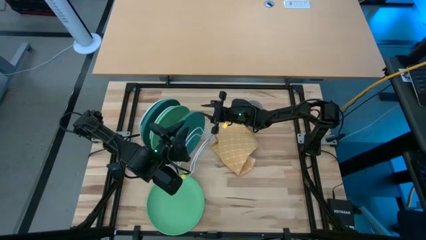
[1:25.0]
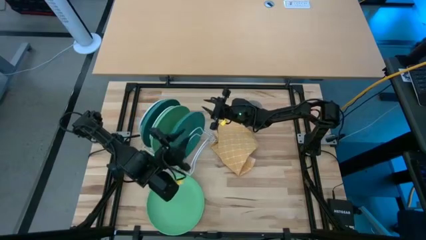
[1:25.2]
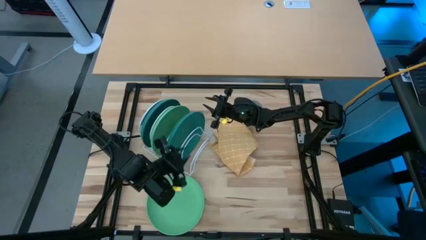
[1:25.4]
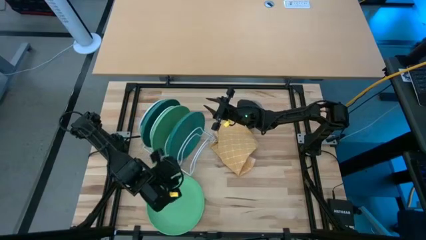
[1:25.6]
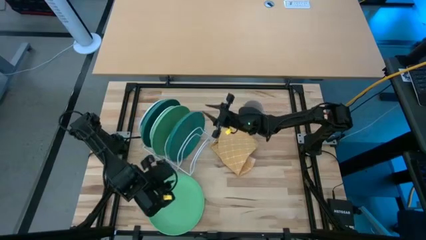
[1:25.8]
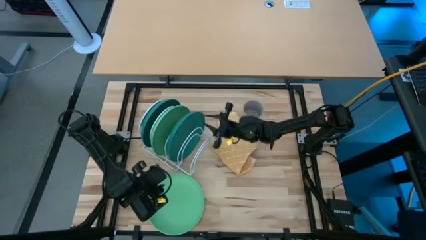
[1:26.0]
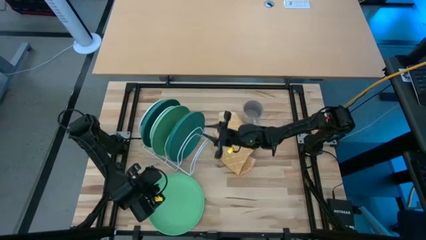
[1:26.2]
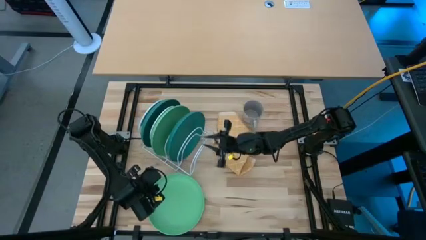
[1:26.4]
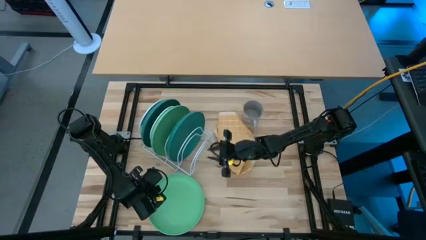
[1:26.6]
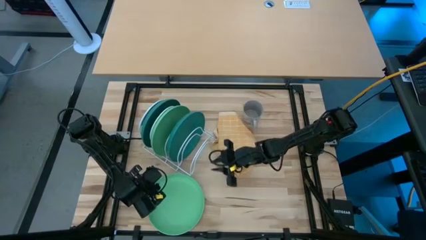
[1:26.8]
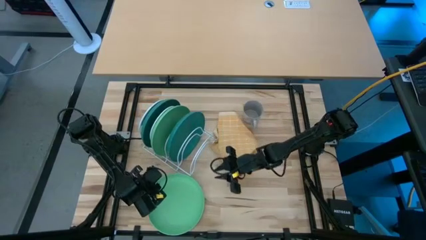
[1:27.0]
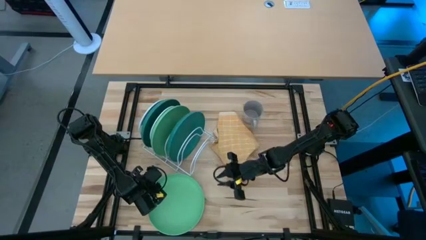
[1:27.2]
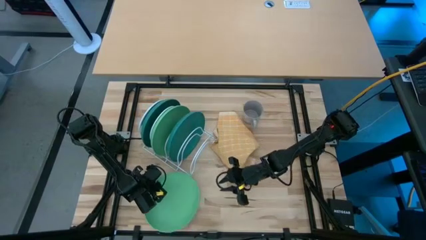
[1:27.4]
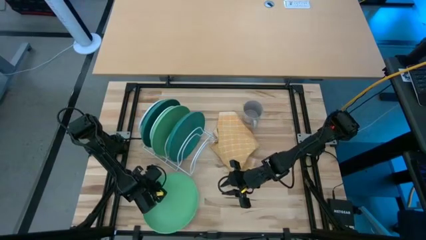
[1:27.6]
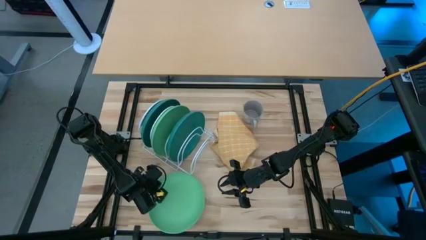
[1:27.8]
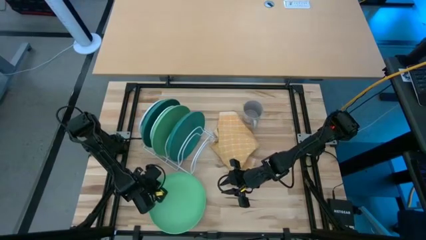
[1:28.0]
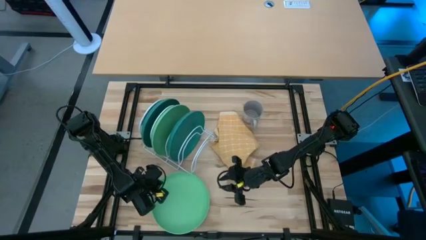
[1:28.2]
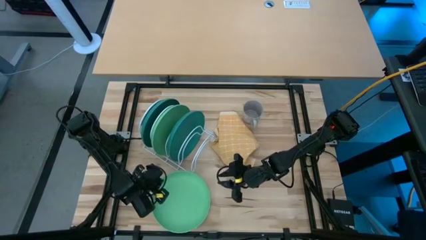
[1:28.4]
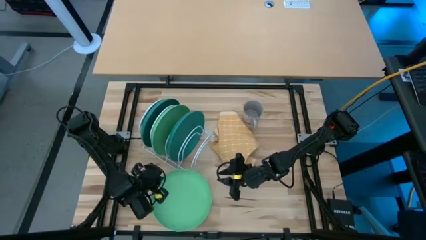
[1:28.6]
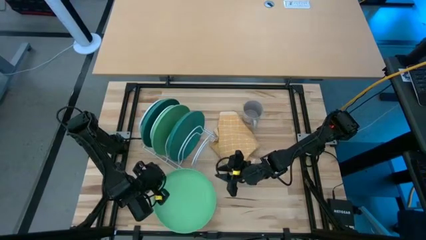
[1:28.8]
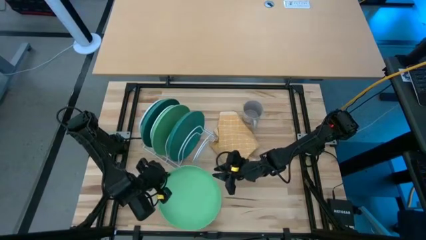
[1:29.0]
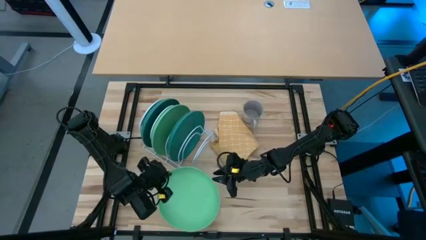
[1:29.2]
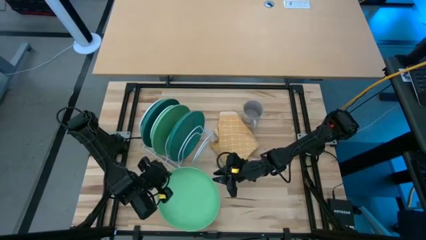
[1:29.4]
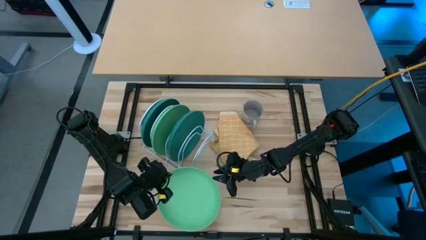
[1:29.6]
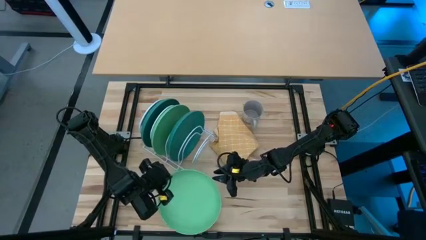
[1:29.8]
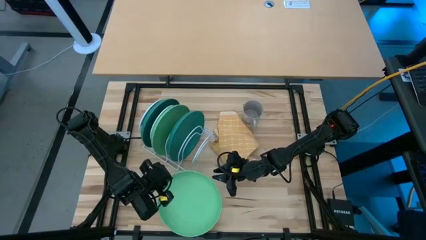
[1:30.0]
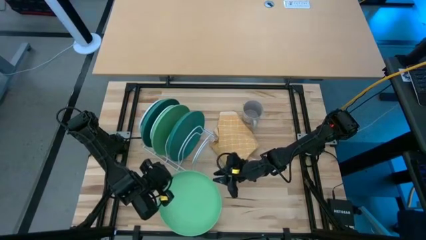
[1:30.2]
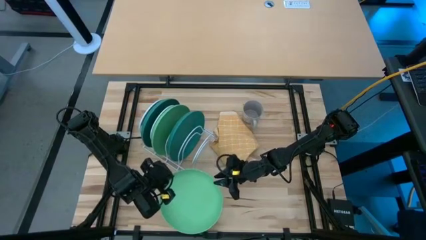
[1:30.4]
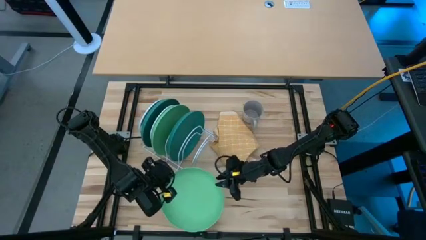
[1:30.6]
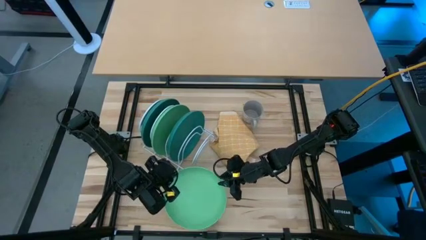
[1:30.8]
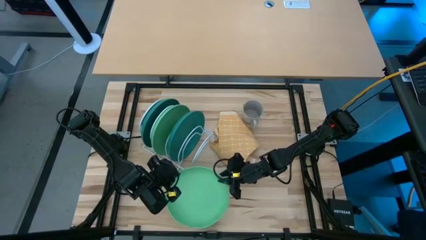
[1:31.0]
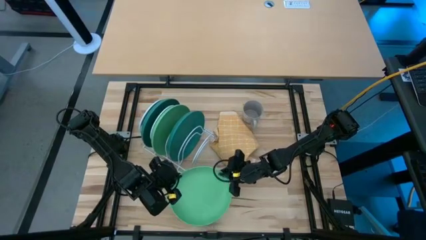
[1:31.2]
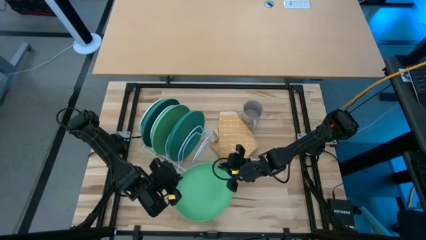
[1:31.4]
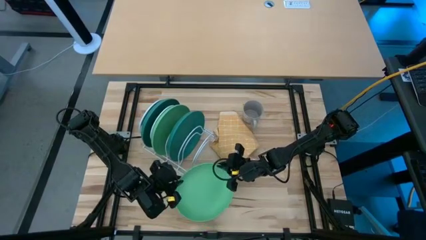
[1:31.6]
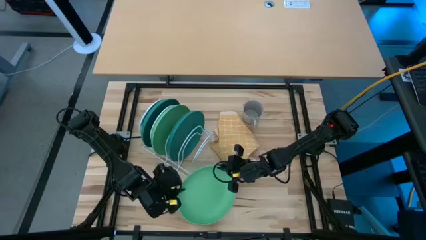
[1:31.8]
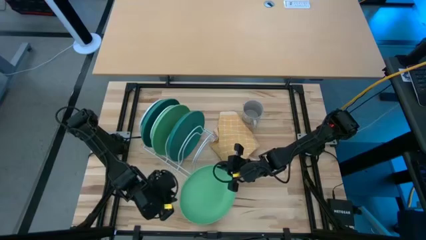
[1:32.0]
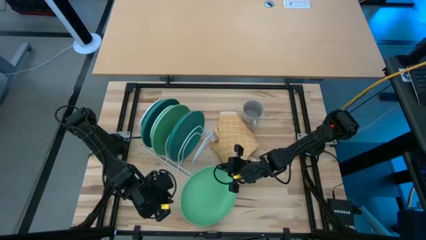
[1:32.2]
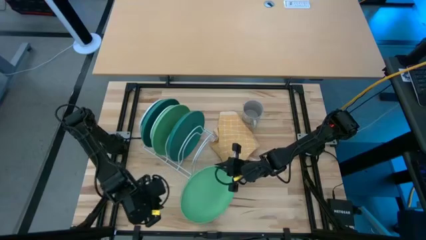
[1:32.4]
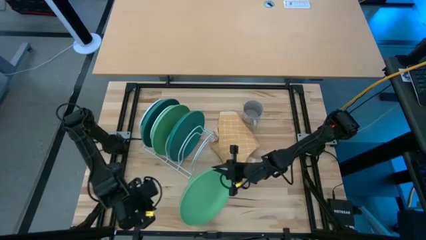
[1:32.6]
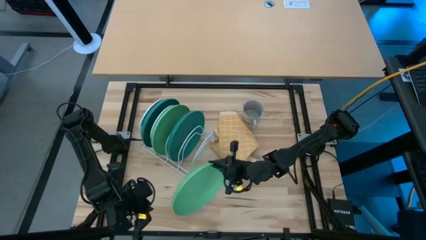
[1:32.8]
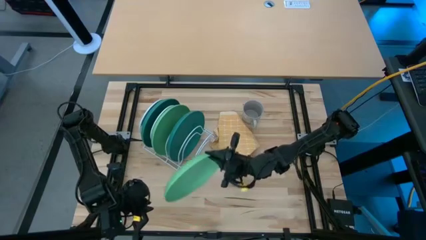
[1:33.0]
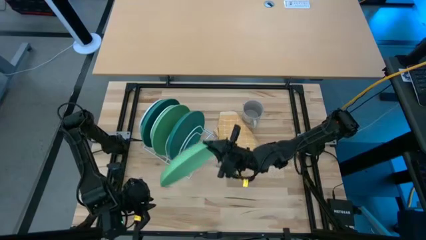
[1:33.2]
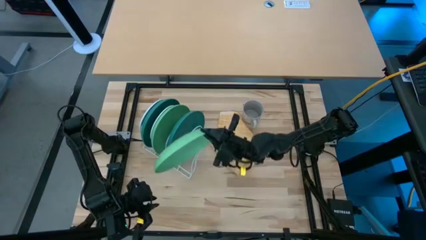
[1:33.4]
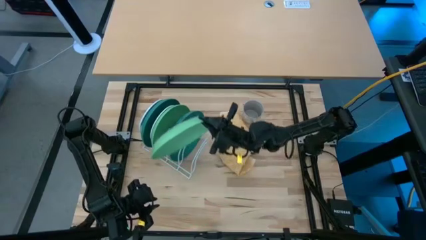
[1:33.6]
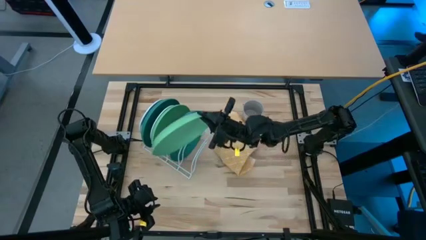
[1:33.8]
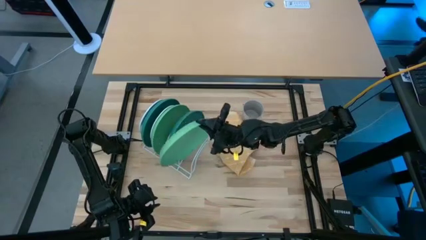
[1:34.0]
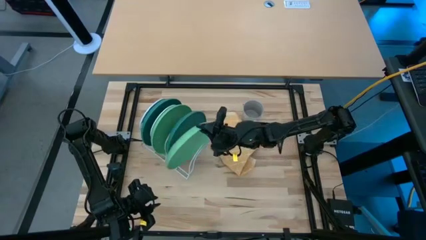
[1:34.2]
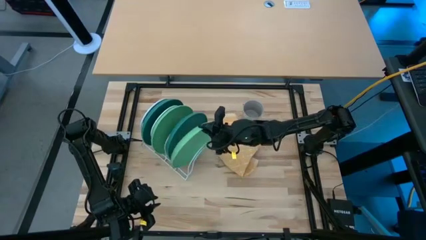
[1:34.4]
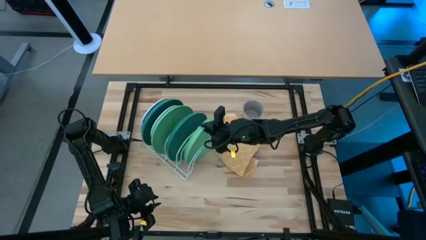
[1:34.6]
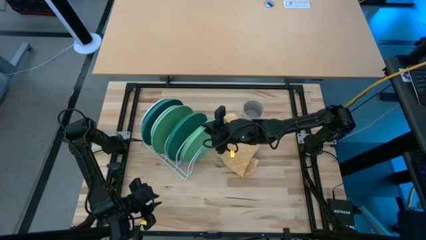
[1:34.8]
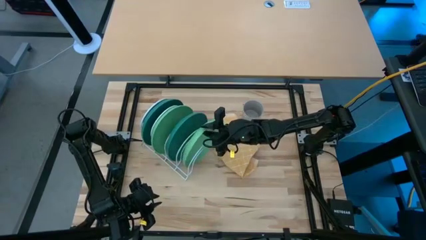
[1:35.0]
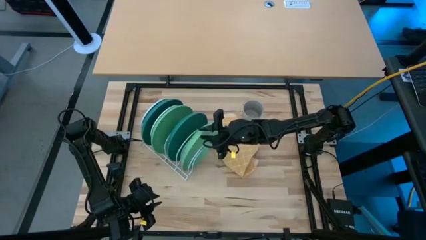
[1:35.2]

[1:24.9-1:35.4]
Task: Sort dishes
Put the left light green plate into the dish rack

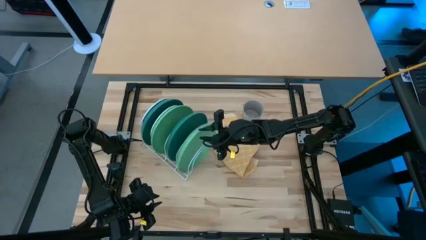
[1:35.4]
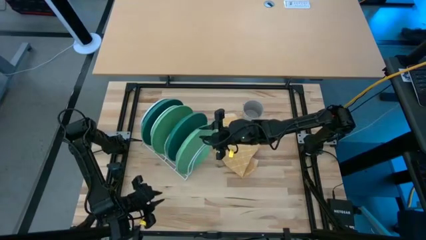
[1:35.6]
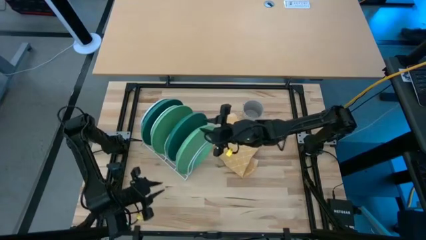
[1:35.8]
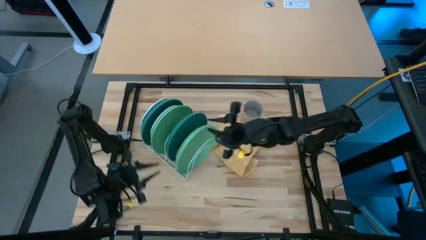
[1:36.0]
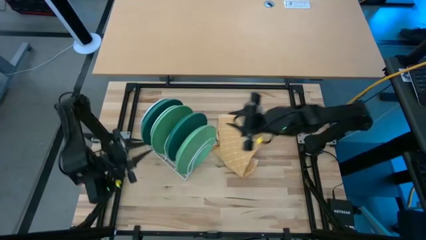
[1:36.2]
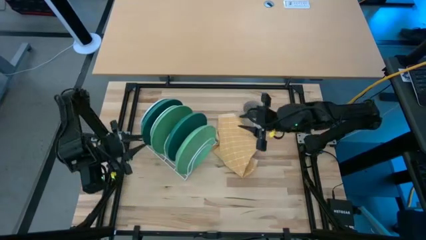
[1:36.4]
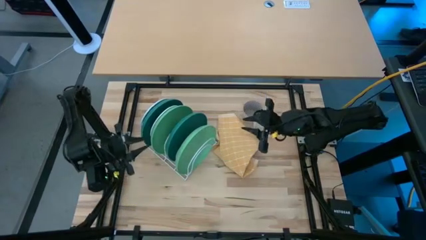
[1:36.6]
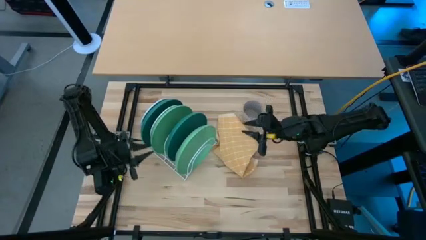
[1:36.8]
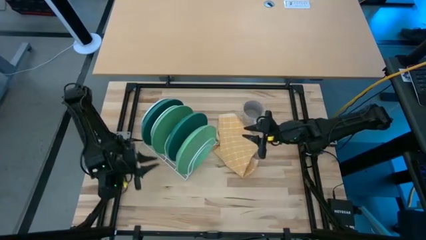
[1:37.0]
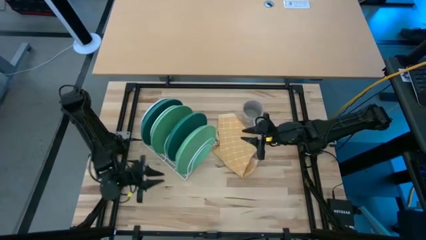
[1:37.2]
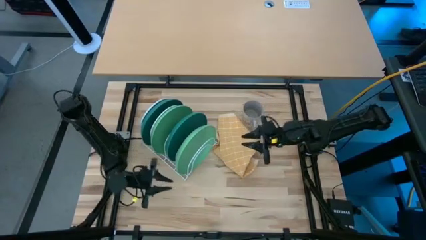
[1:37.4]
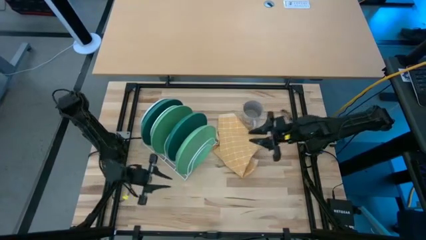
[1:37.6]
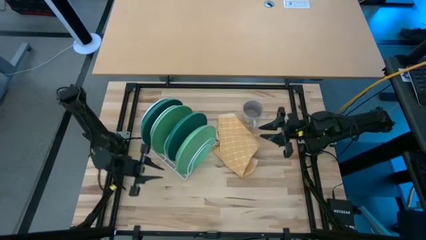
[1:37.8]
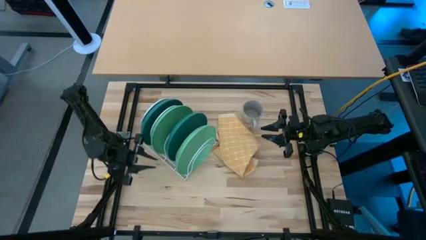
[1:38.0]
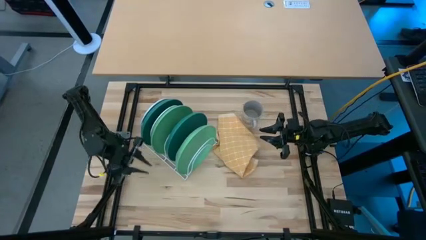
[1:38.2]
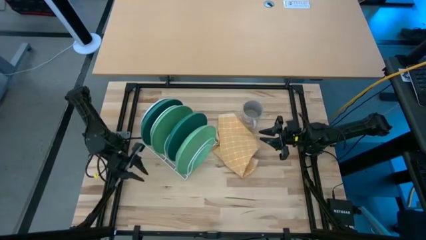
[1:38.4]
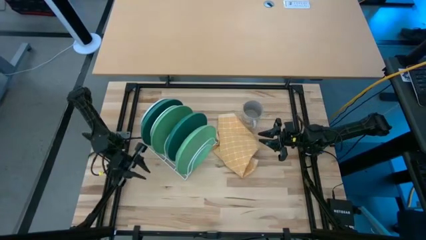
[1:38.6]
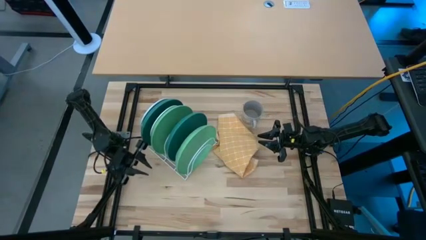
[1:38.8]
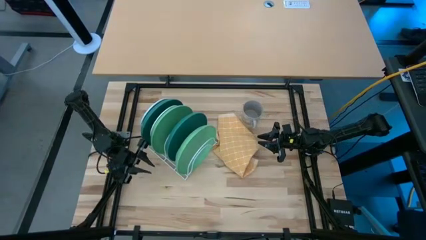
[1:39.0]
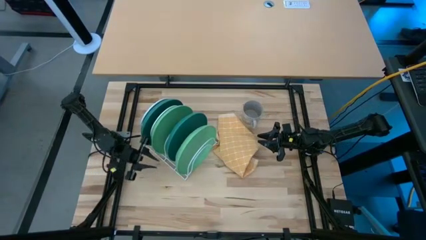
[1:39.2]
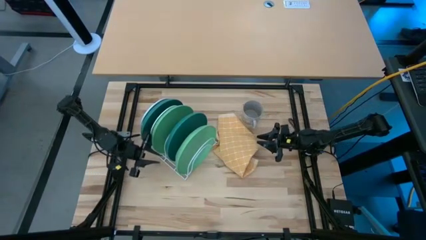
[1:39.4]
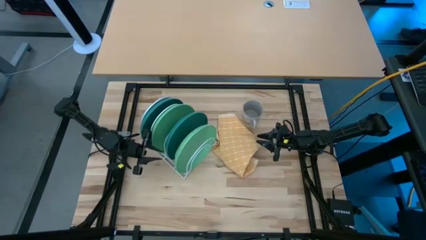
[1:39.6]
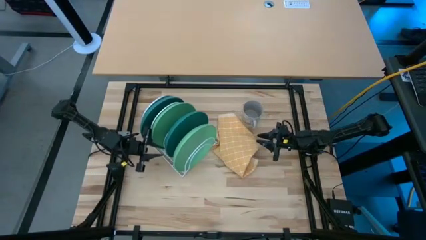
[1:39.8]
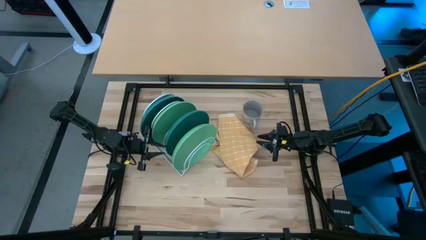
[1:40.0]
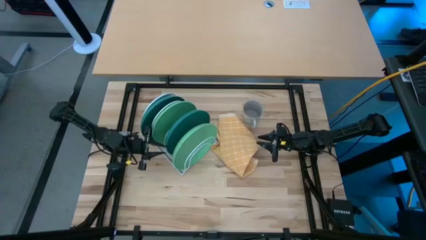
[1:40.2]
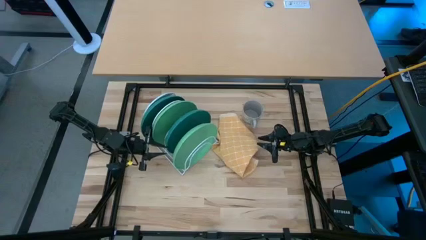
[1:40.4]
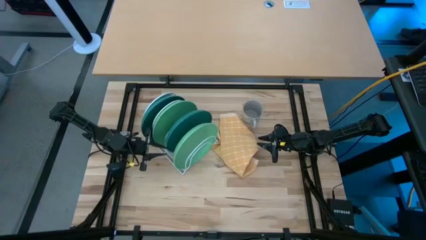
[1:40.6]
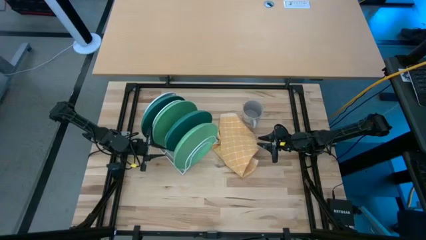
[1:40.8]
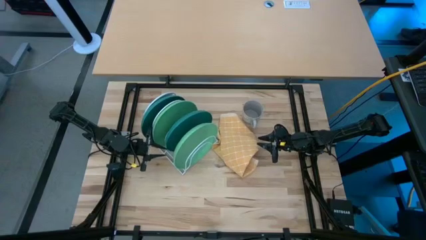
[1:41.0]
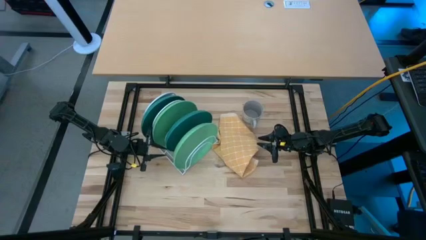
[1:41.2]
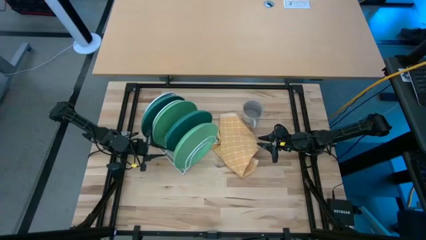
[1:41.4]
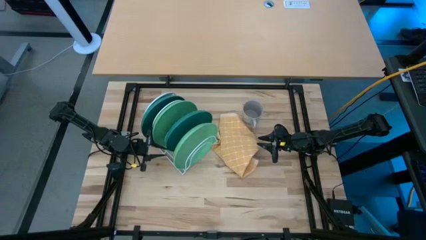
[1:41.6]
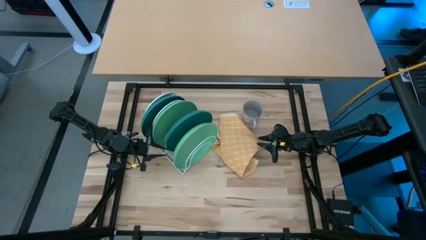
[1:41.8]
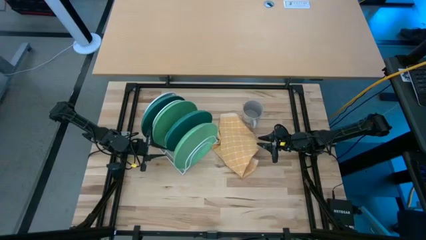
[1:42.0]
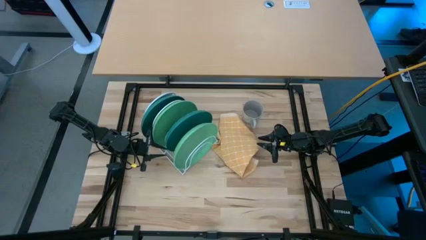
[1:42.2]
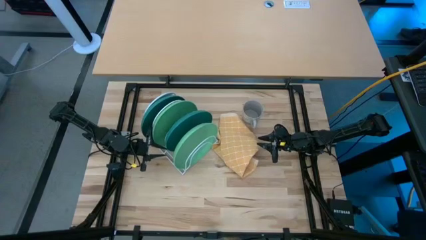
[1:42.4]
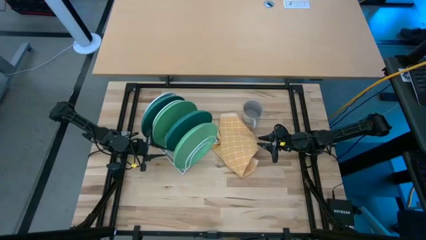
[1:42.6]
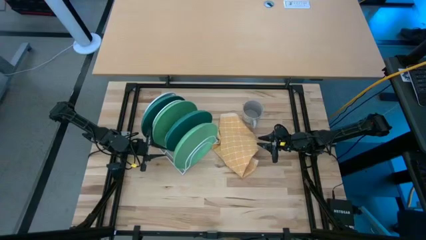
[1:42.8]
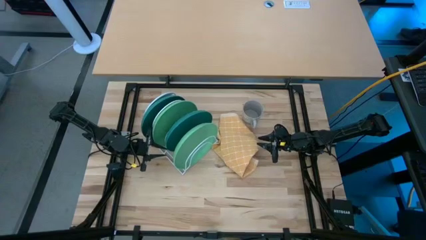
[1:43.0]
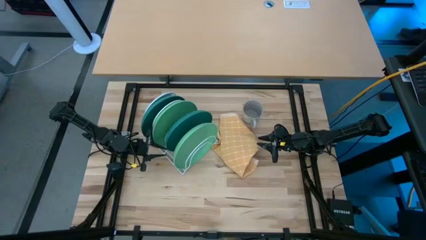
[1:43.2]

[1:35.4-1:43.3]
Return to Home Position
